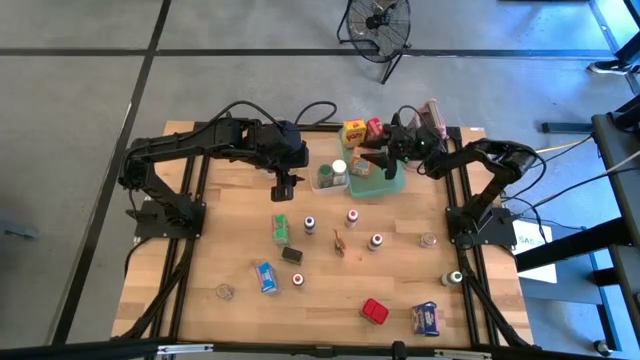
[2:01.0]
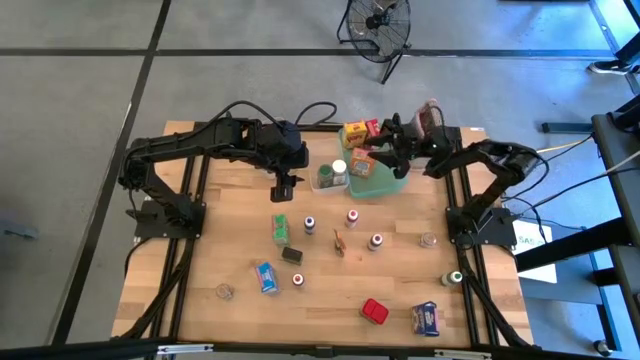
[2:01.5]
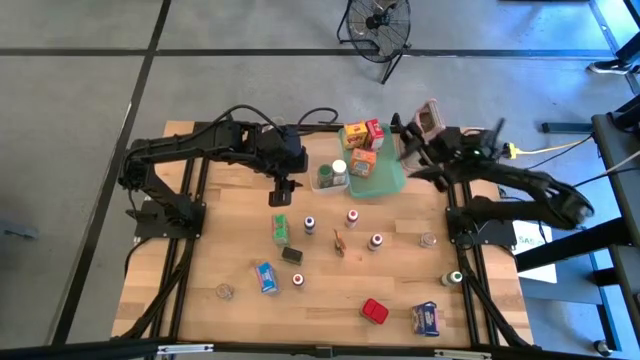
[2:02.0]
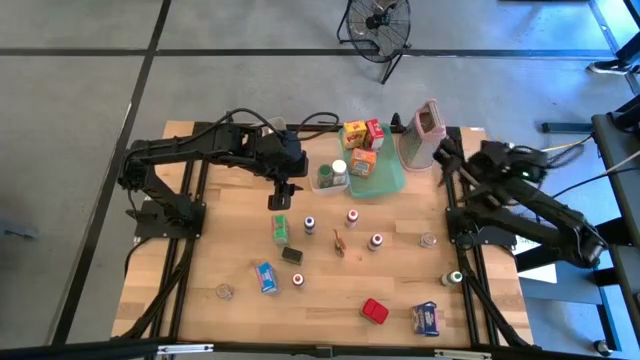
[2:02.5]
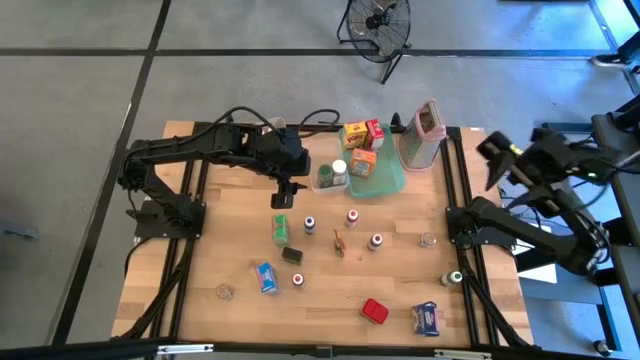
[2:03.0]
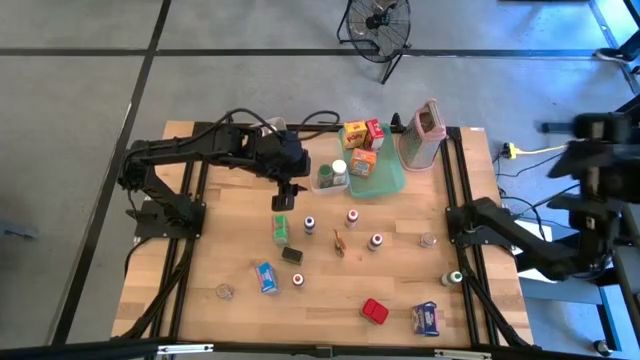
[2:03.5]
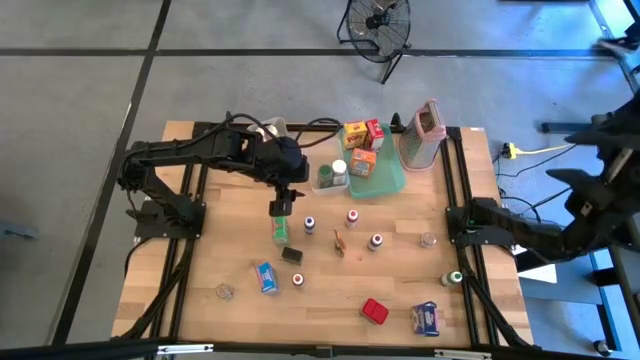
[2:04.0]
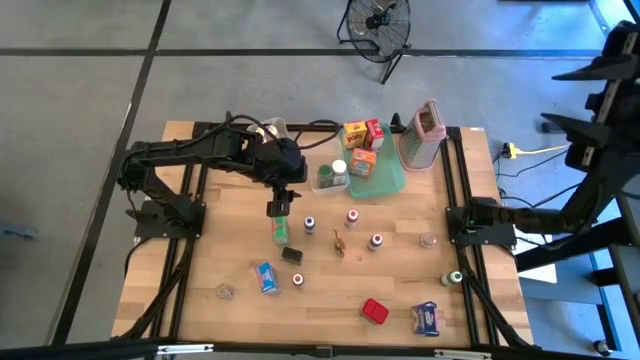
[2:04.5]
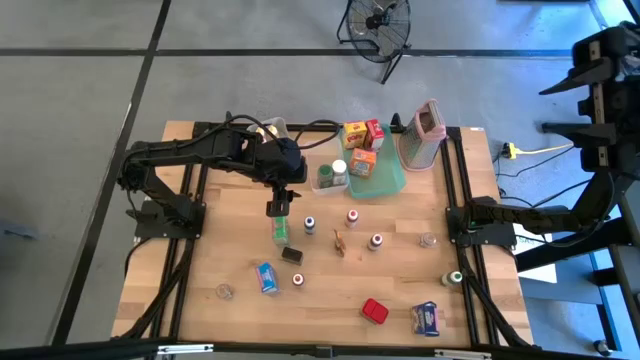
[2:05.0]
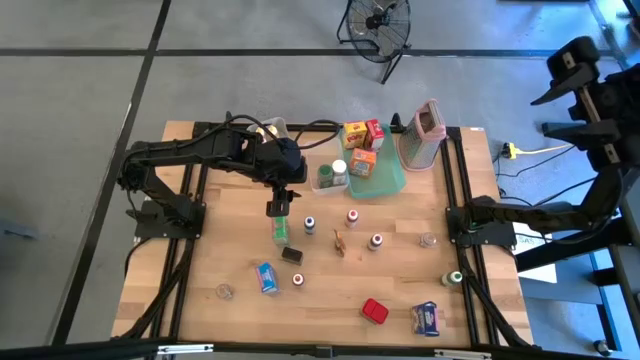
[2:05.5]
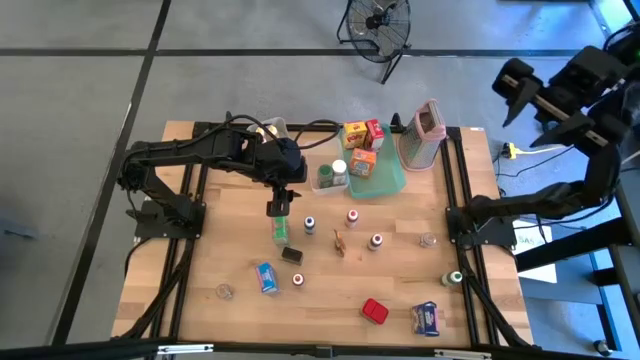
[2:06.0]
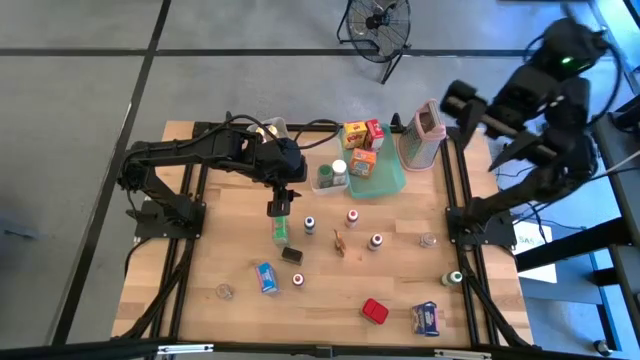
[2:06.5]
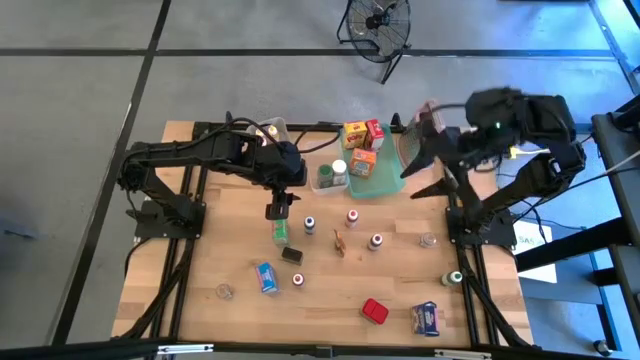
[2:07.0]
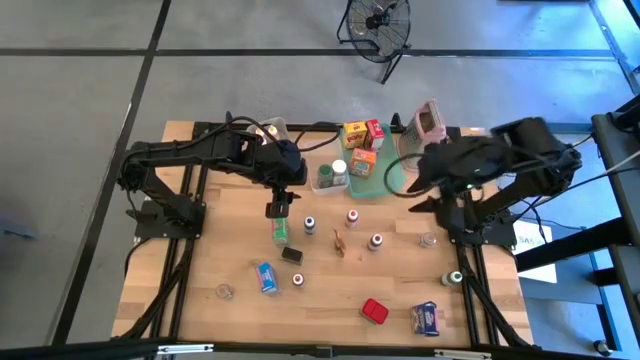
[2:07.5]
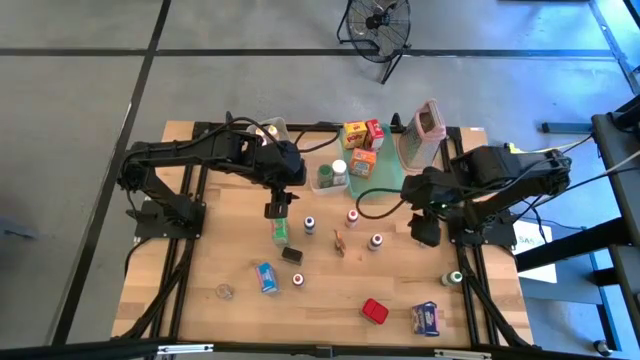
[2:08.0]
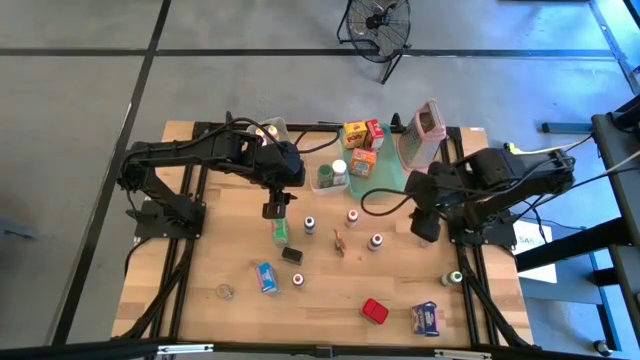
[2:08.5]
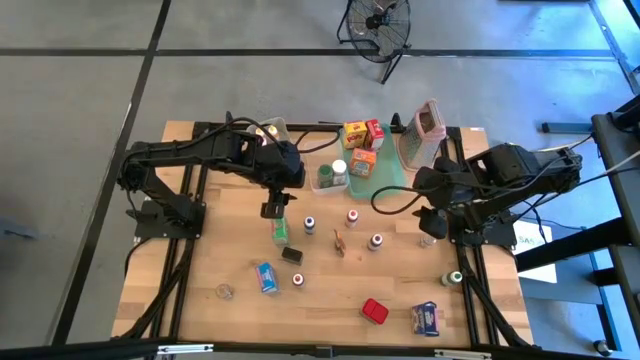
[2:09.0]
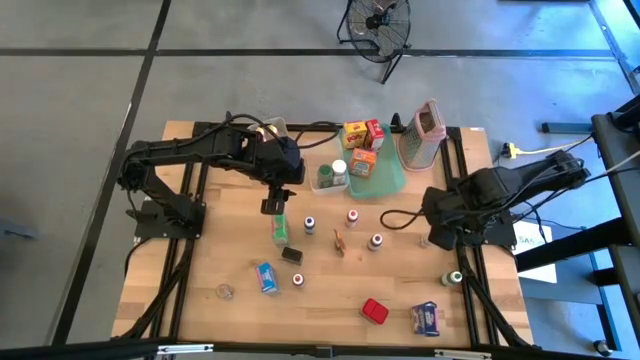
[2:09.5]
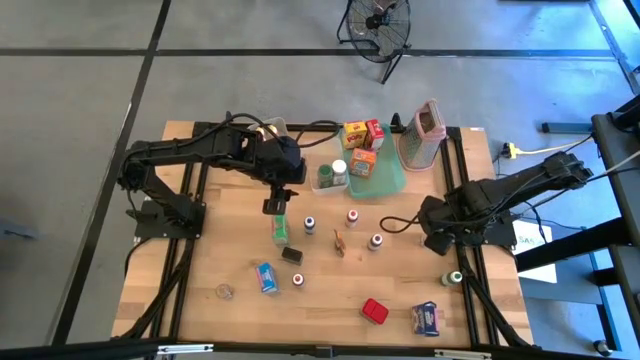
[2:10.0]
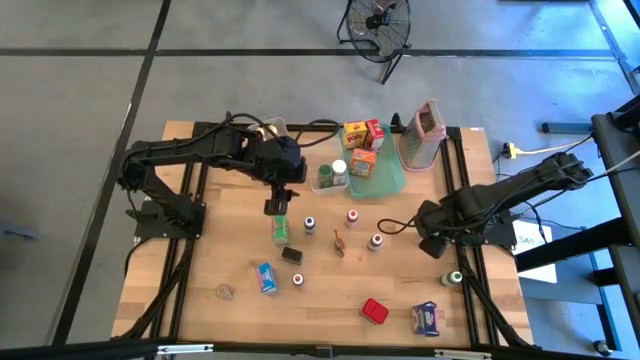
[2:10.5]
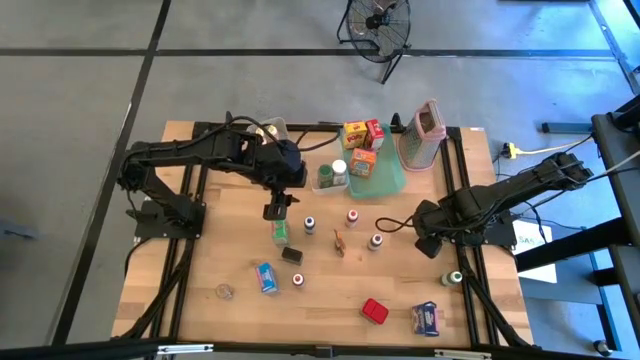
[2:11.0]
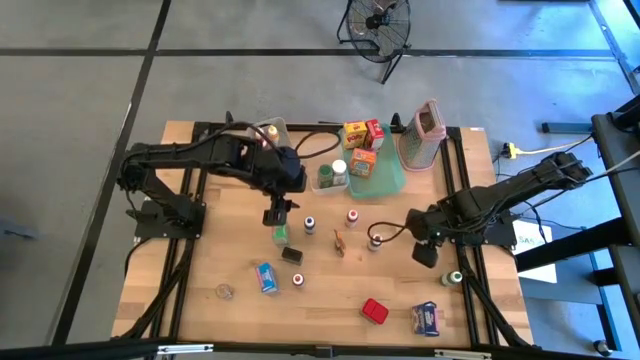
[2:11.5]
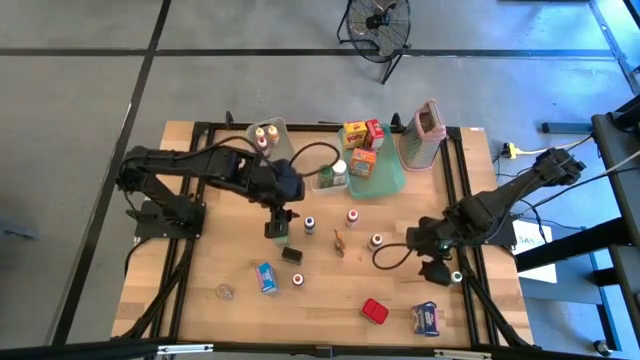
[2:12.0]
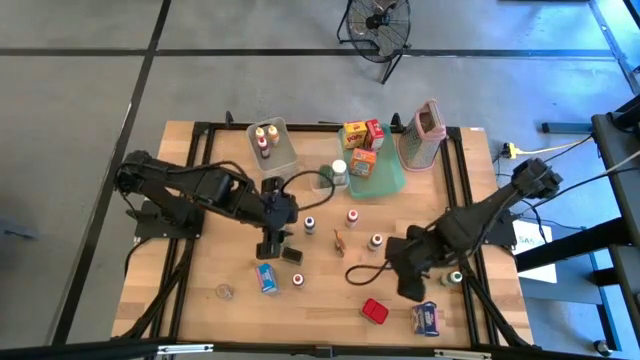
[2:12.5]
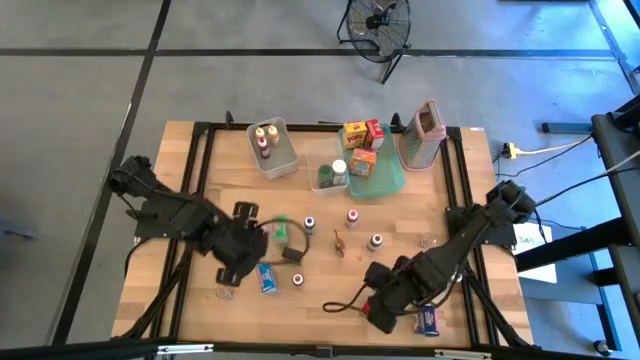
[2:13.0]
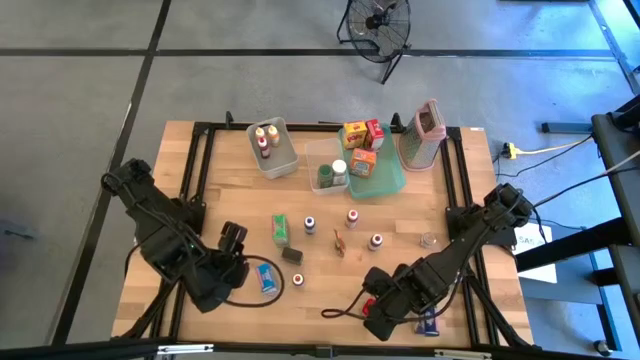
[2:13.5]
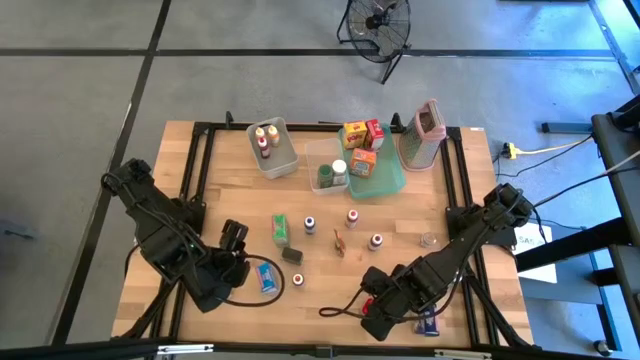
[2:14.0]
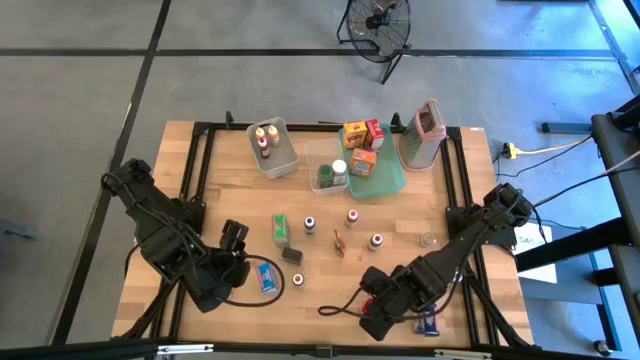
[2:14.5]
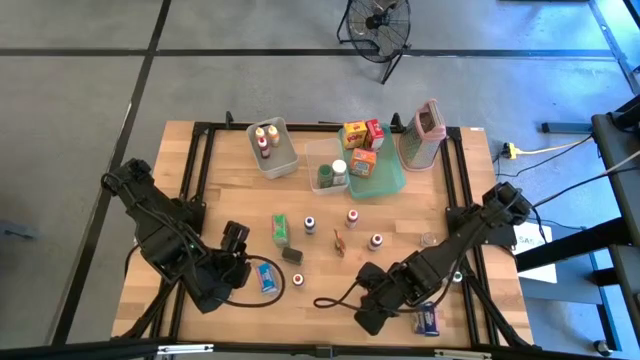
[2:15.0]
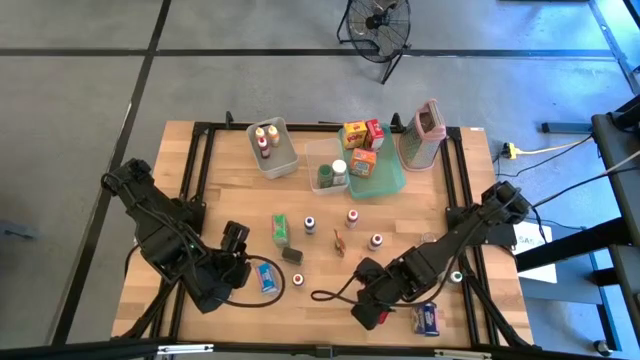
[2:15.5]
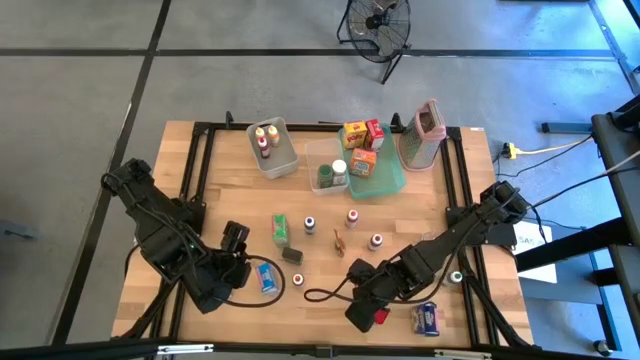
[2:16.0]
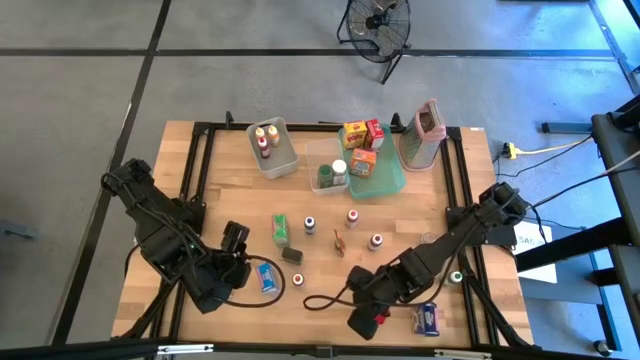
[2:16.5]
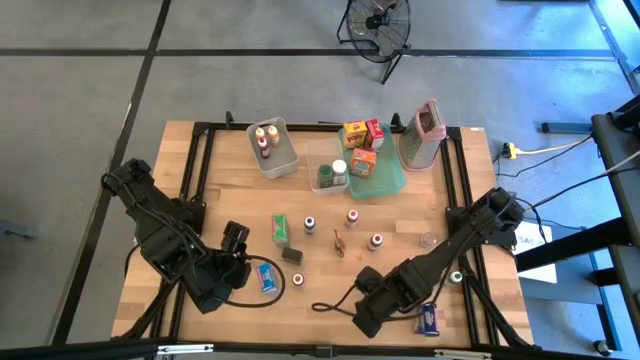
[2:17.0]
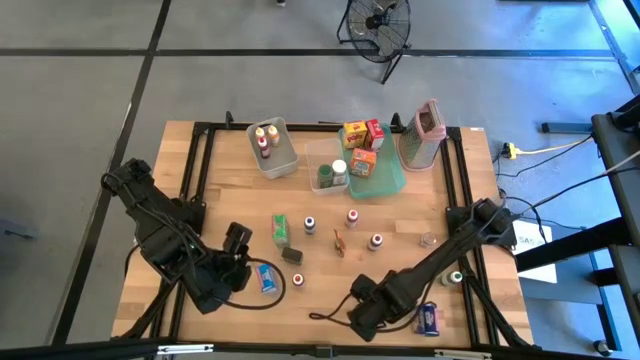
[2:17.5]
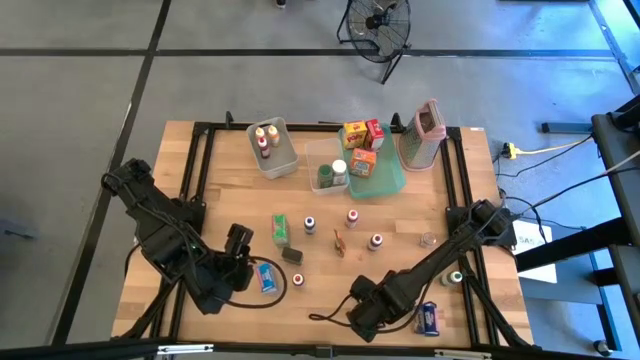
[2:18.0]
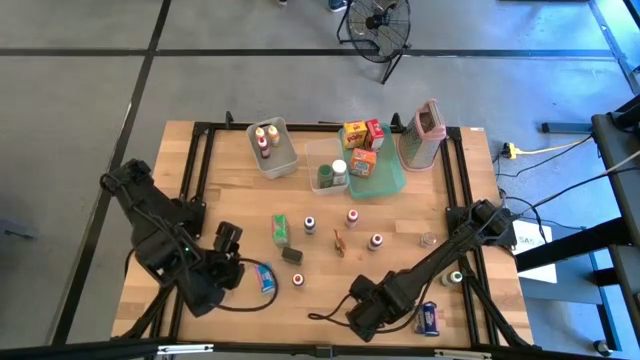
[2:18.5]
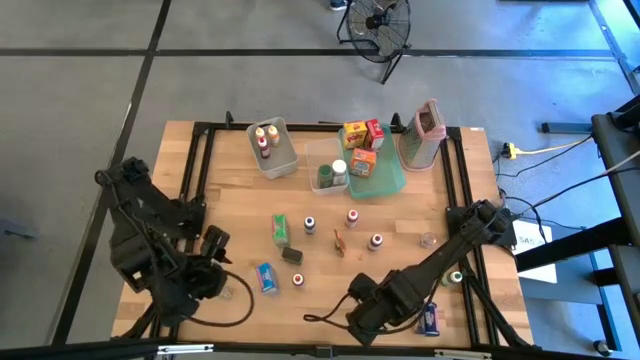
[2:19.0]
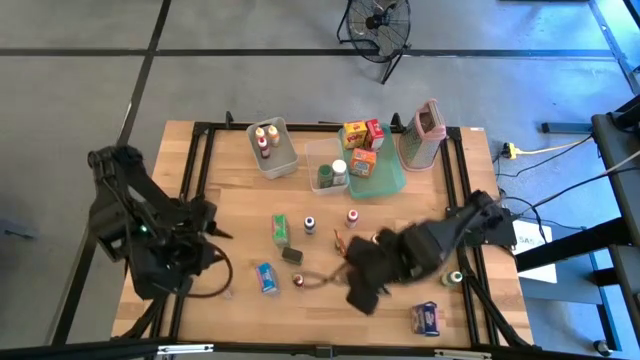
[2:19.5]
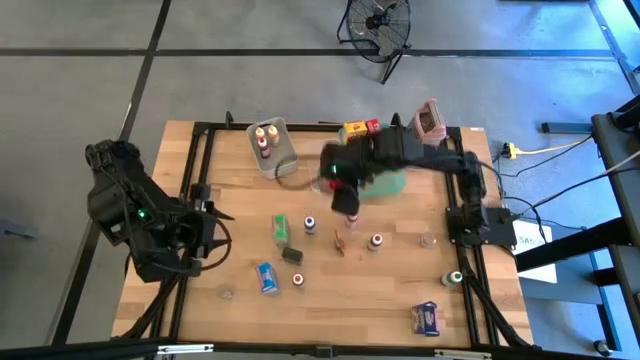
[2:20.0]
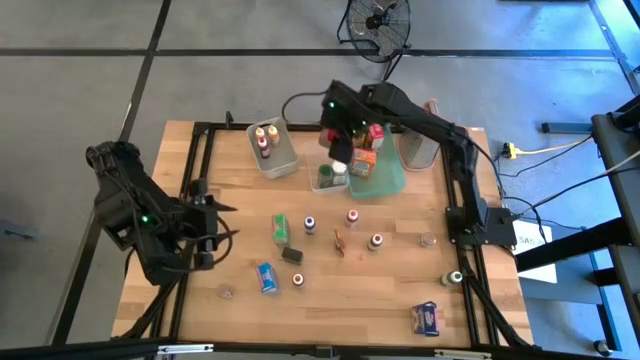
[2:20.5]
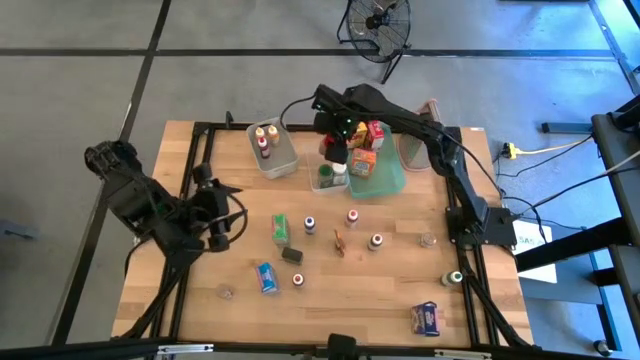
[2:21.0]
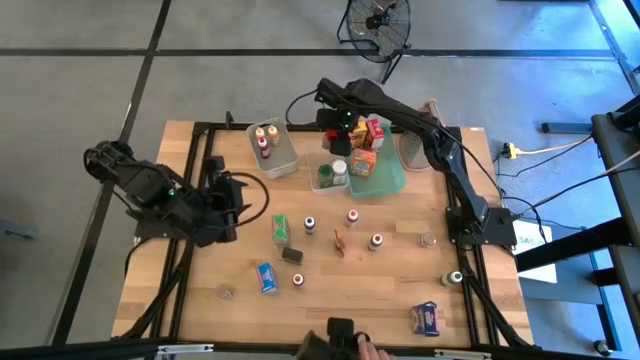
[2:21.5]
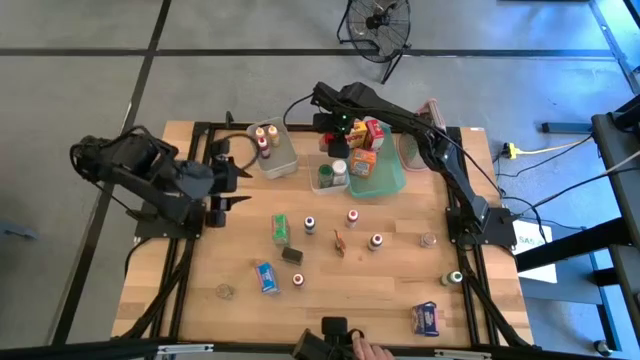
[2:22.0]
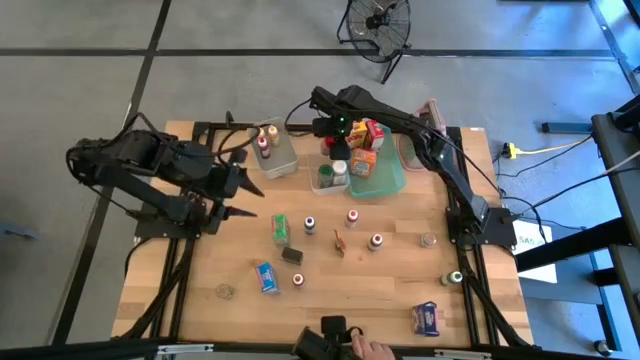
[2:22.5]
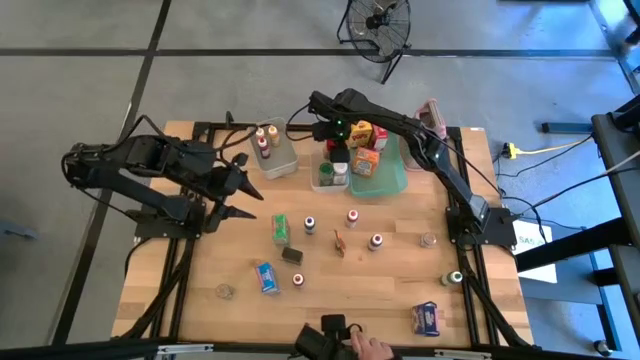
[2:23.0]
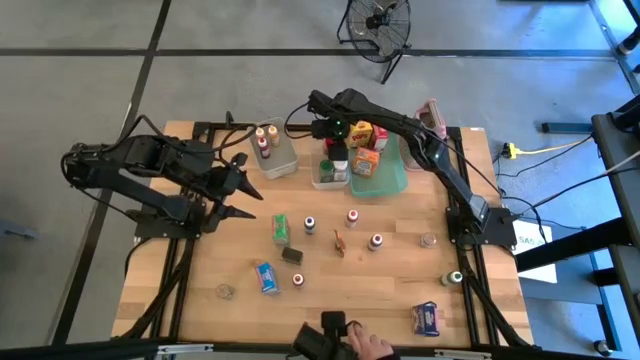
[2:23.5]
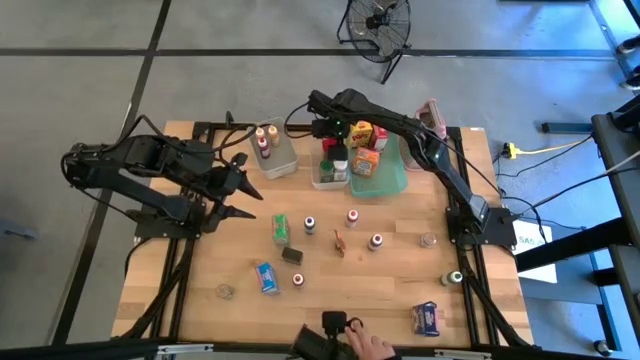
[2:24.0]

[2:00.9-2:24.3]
Task: Pick & Place Kitchen Items
Put the red seasoning can into the white bin
